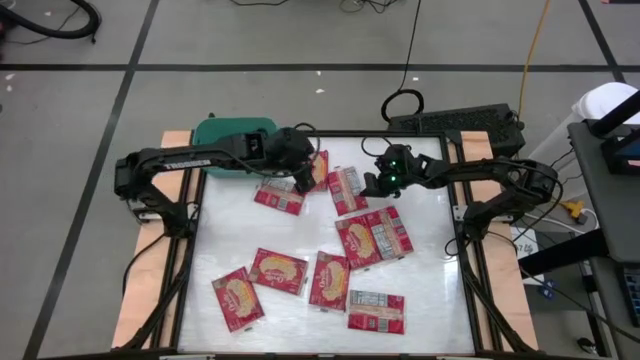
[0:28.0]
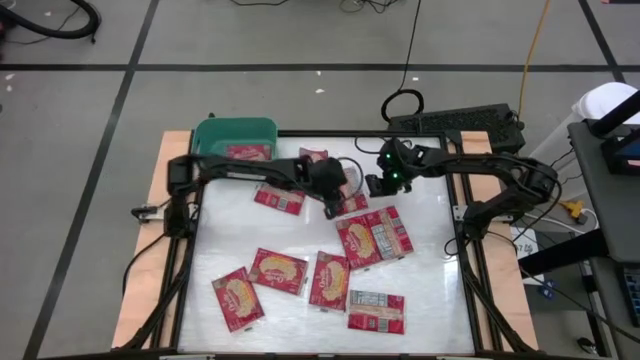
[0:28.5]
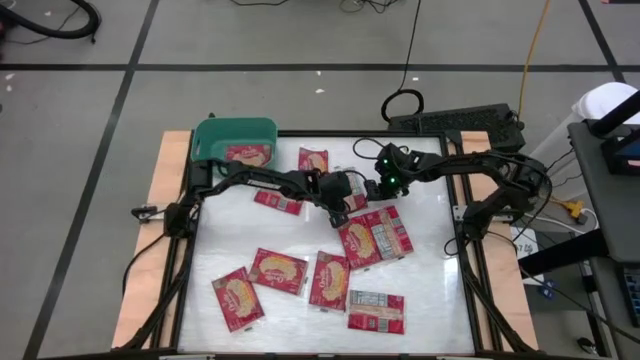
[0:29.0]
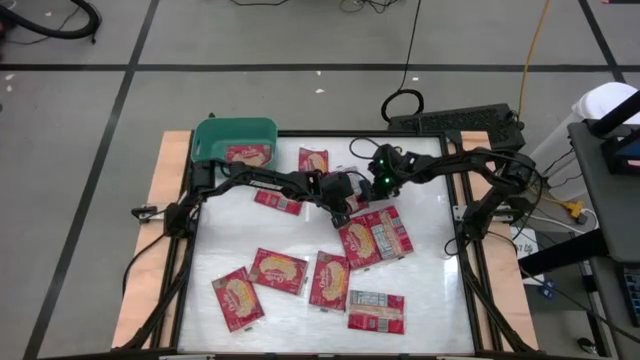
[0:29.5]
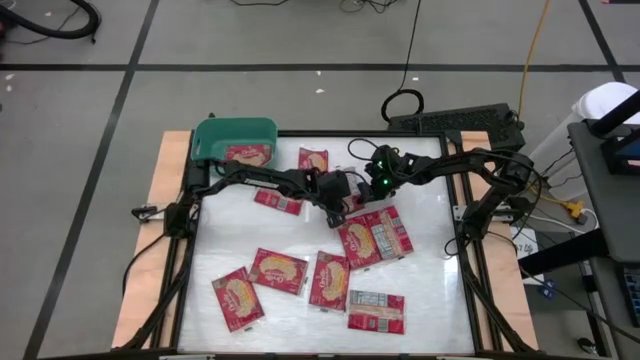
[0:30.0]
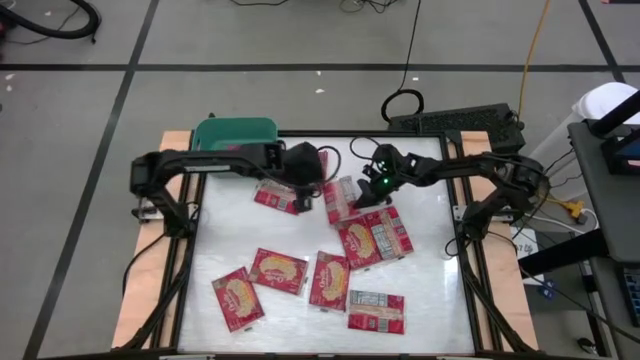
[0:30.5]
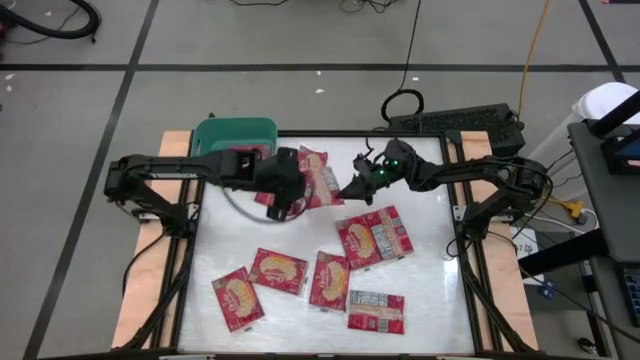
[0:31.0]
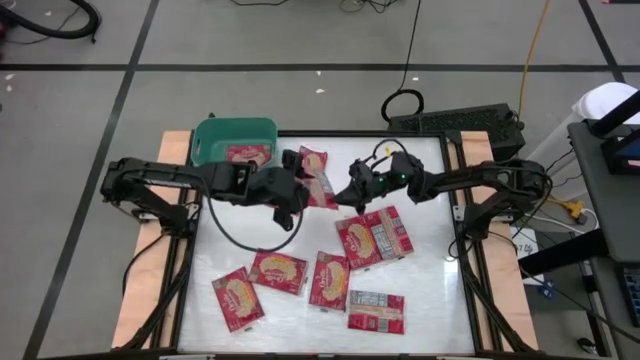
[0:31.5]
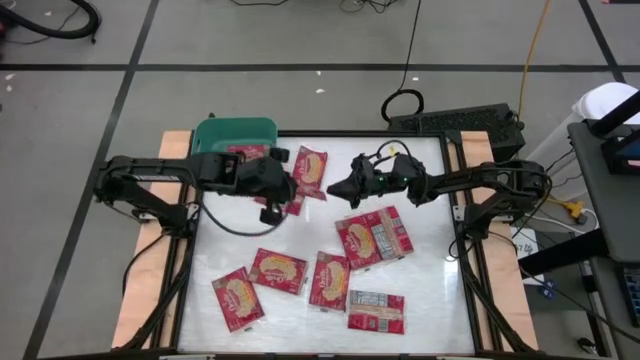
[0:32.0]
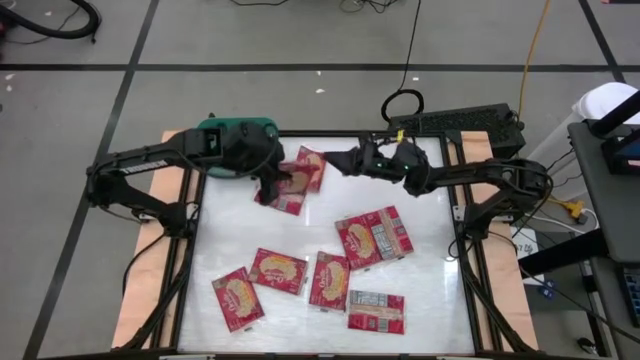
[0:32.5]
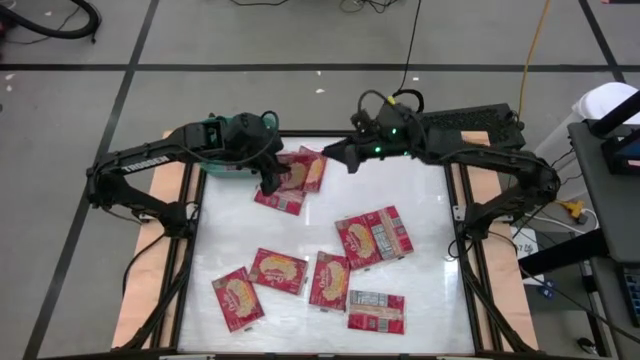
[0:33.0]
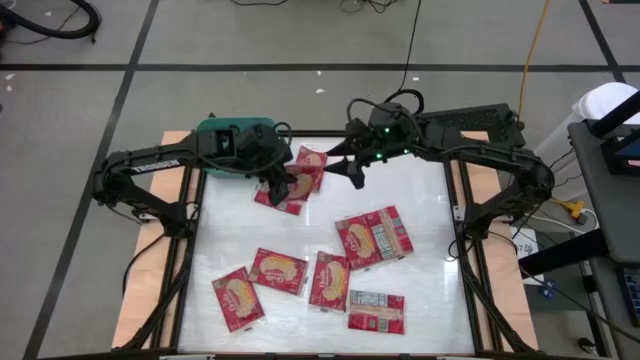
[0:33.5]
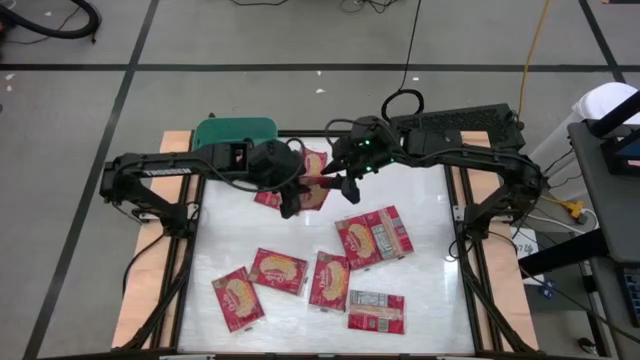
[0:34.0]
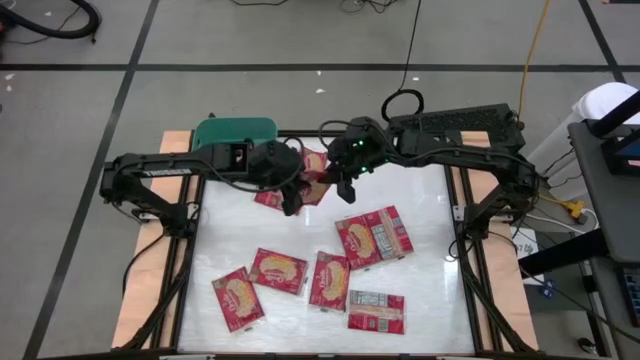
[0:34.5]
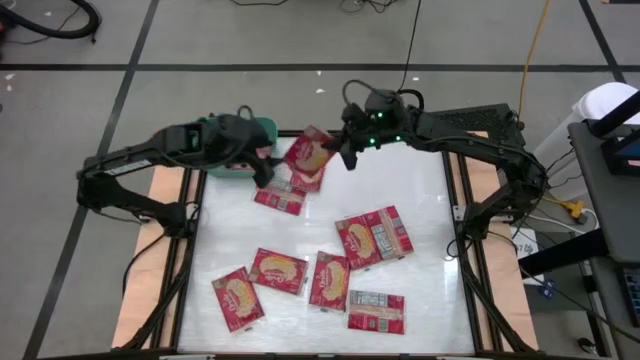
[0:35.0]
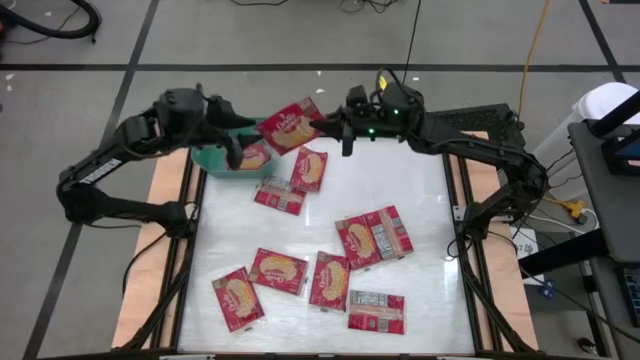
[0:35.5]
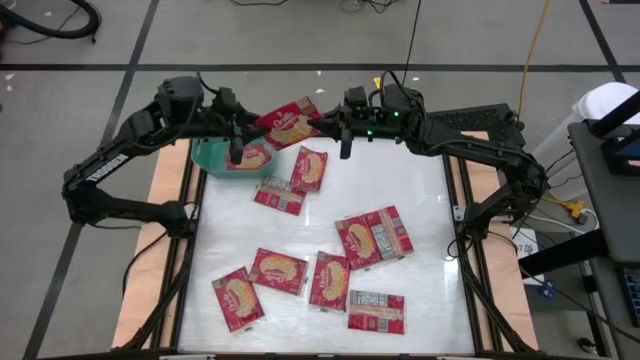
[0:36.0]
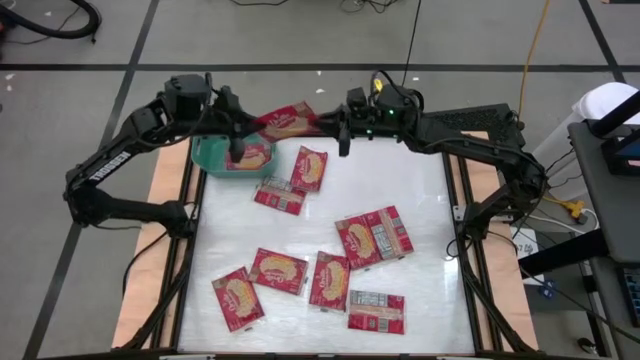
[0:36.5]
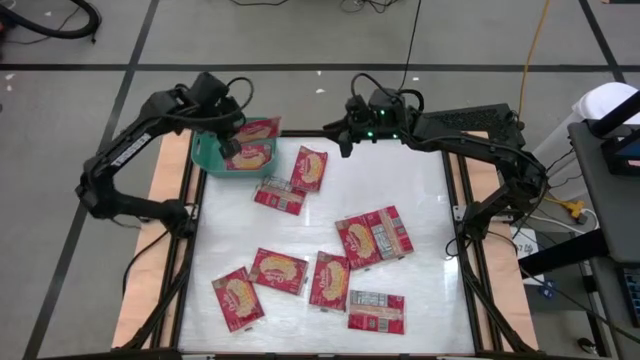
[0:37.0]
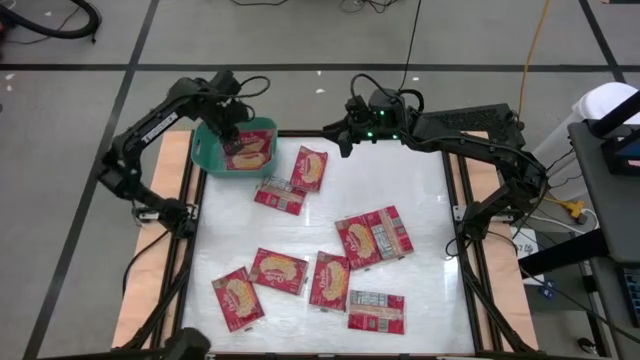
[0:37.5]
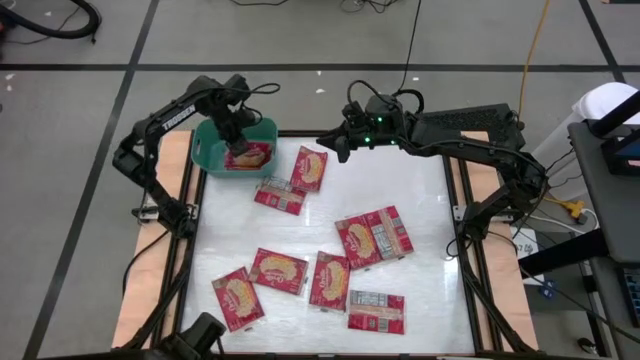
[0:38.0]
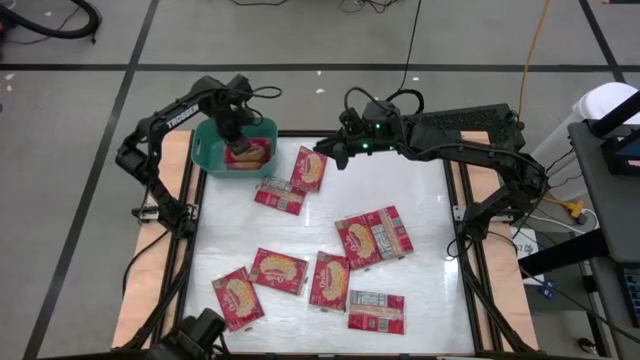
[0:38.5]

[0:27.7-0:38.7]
Task: Sort popcorn bags into baskets
Put the red popcorn bag into the green bin

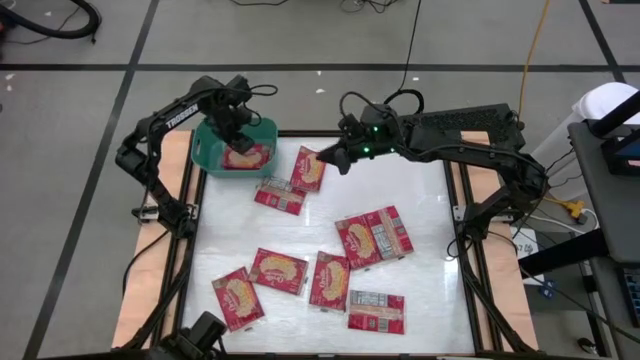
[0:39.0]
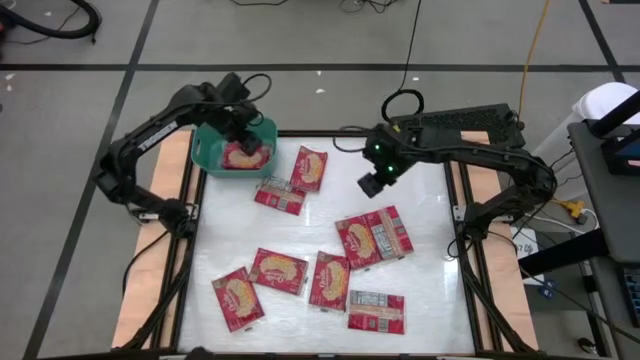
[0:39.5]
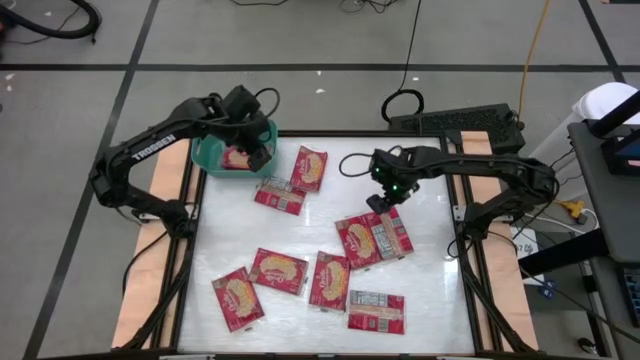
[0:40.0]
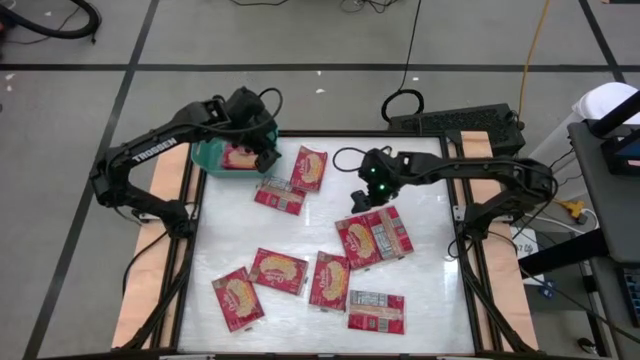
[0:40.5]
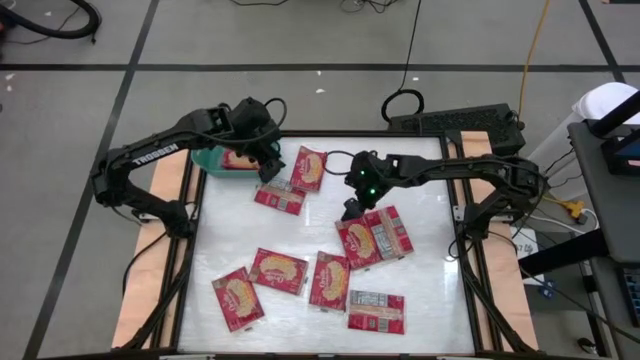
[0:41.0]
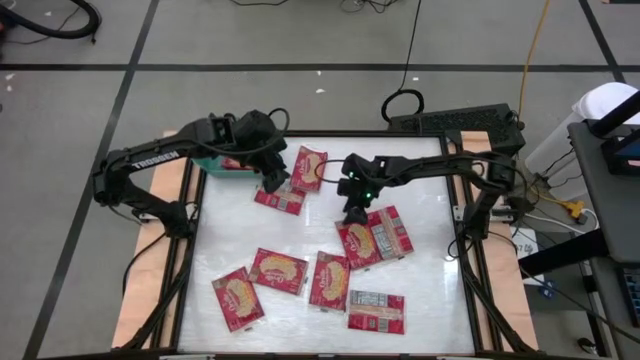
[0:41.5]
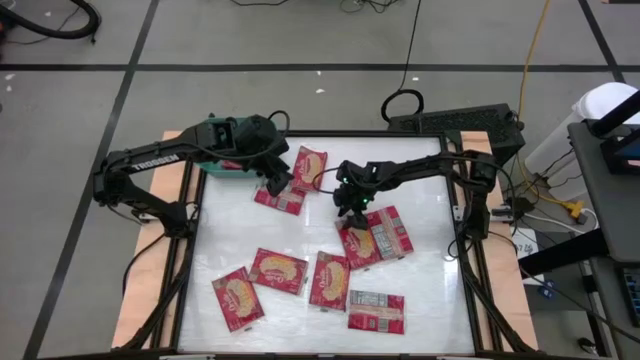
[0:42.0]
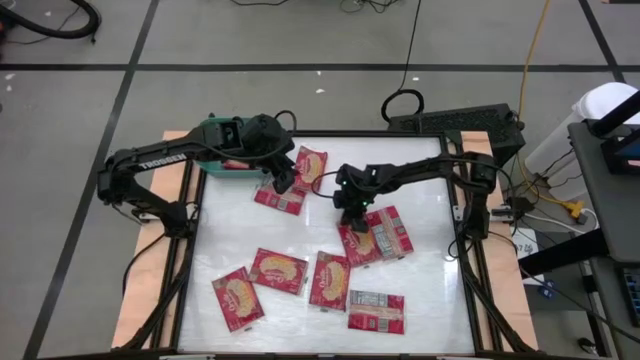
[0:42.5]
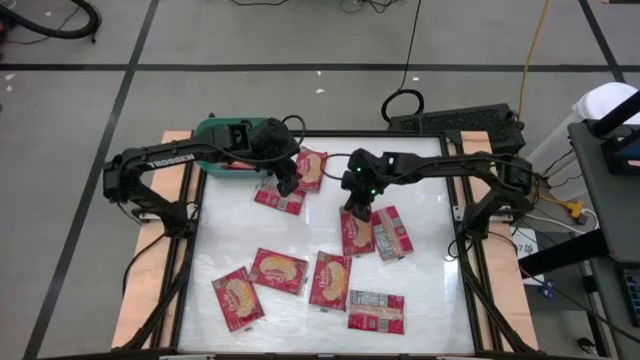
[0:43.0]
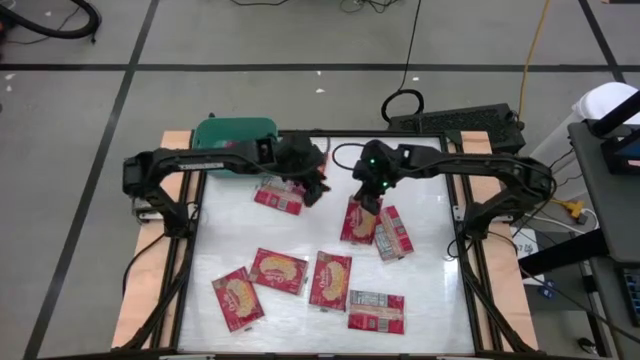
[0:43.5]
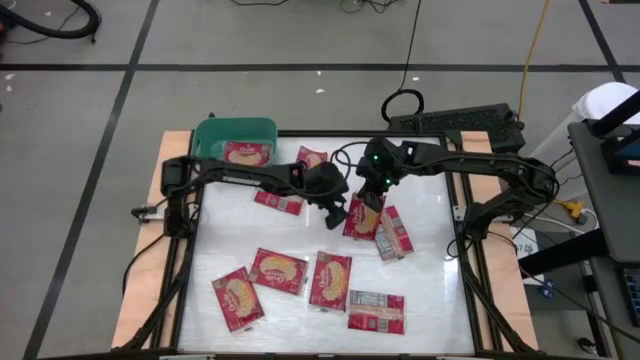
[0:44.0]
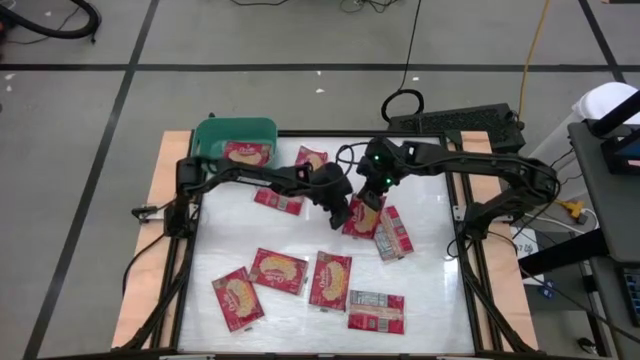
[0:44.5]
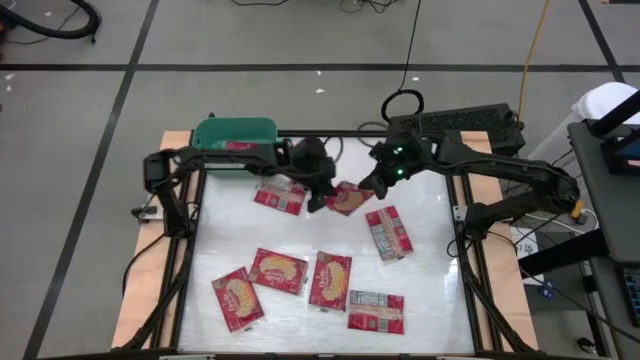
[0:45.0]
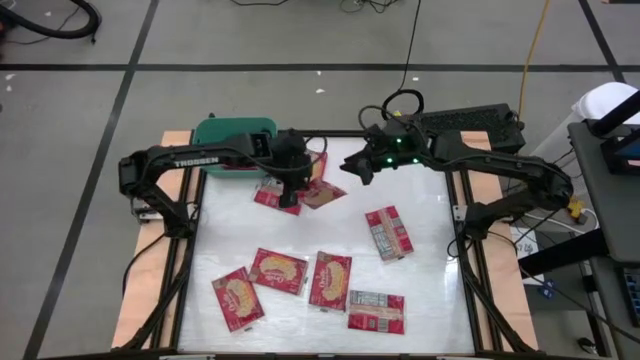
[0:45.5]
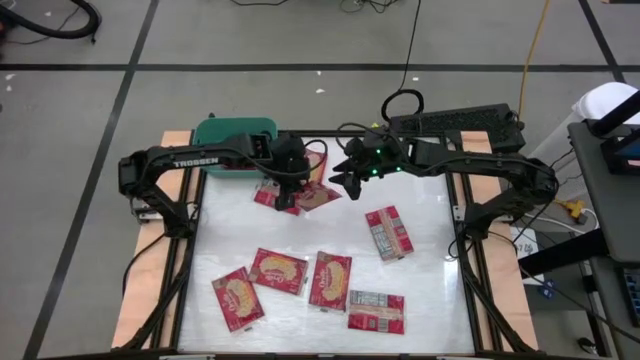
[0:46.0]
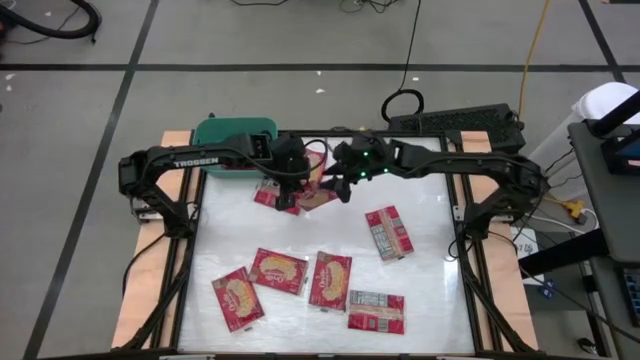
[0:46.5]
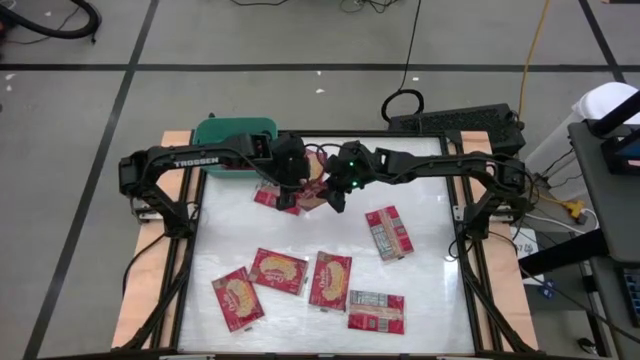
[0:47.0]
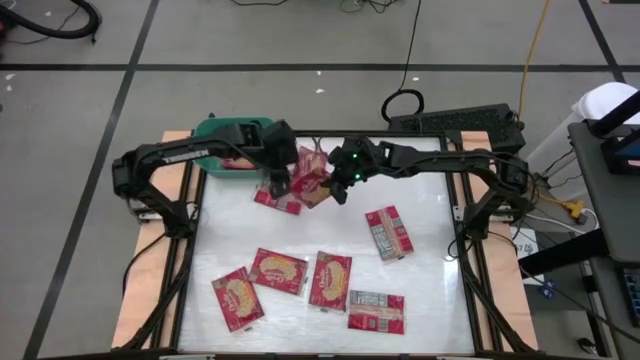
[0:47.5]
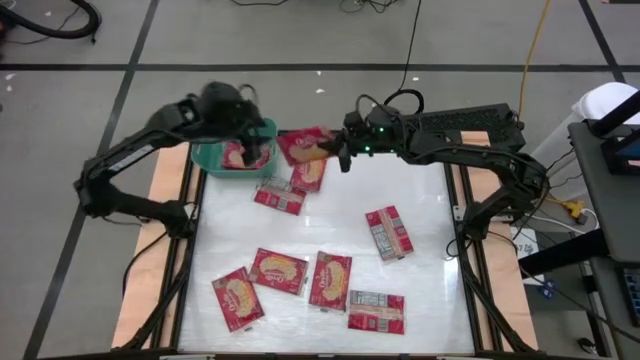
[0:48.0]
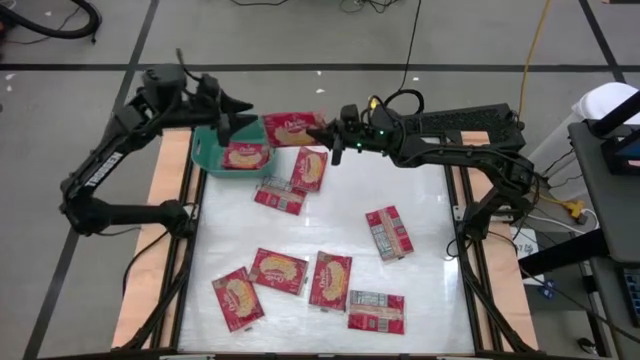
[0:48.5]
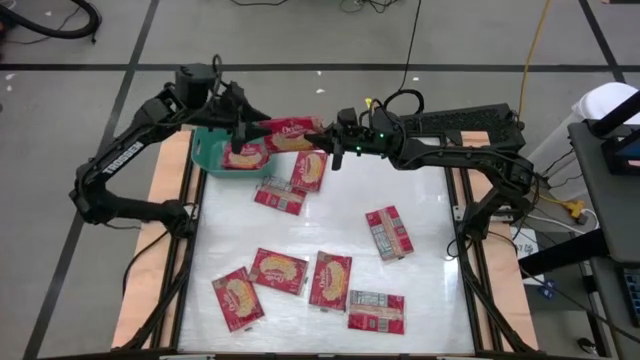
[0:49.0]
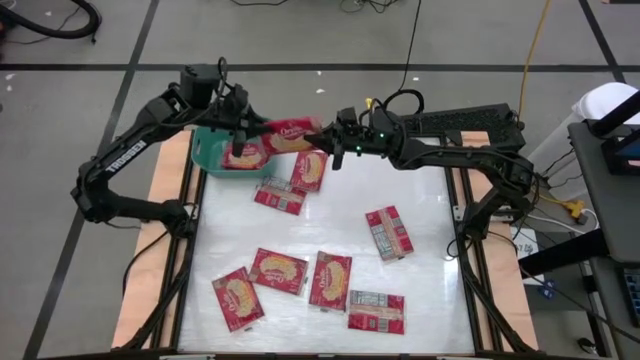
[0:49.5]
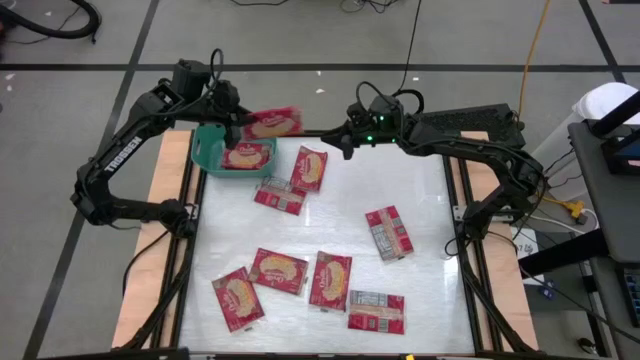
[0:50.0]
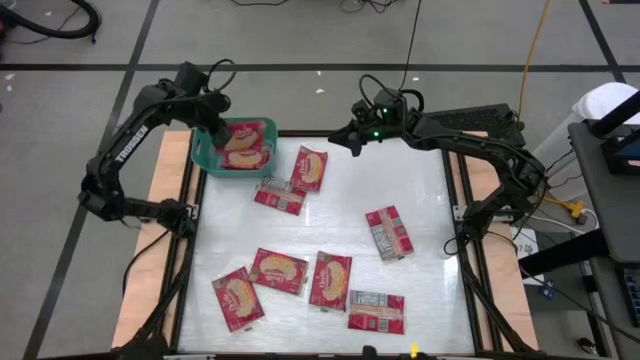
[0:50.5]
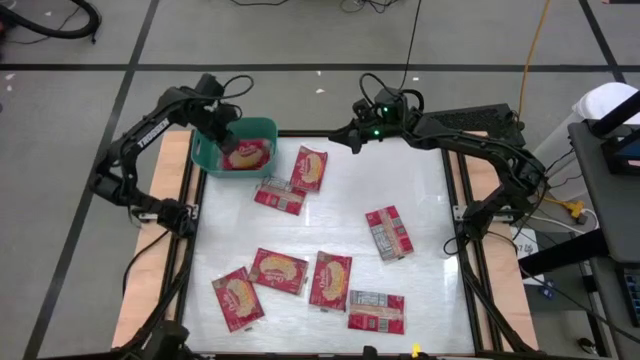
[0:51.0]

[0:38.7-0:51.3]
Put the red popcorn bag into the green bin
